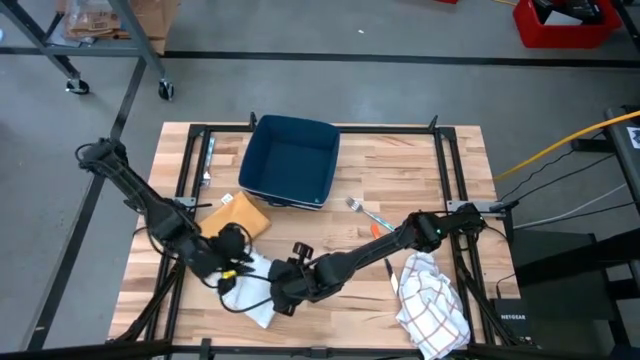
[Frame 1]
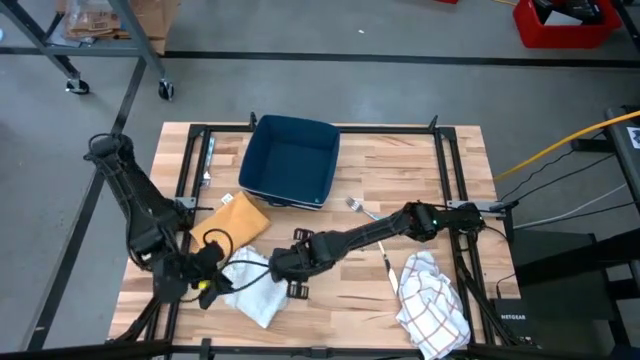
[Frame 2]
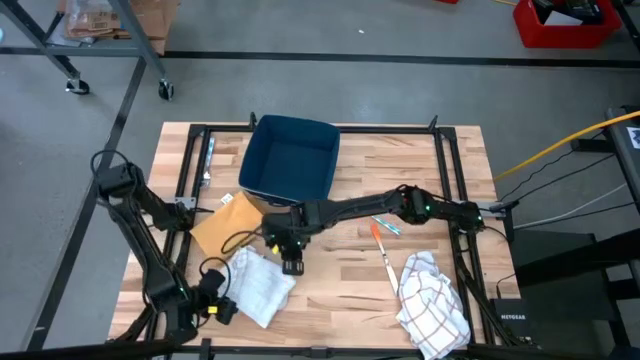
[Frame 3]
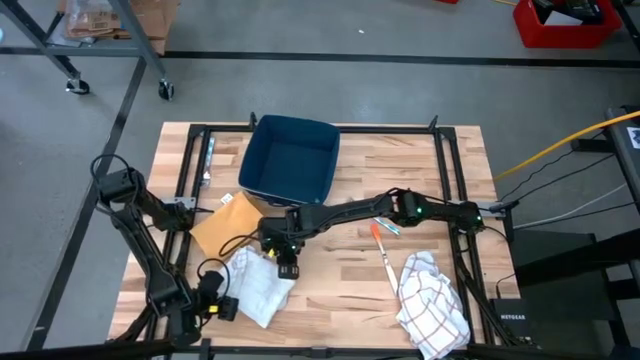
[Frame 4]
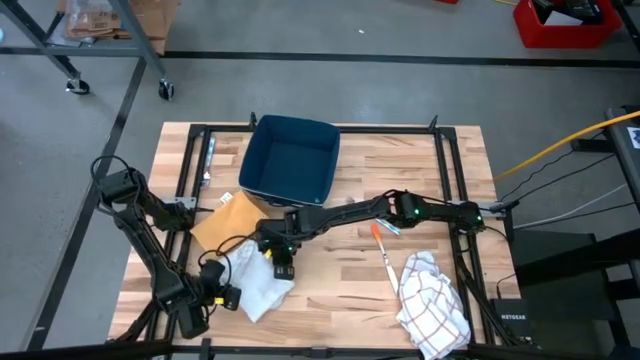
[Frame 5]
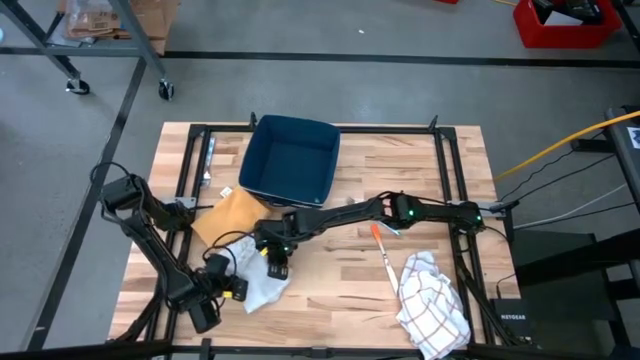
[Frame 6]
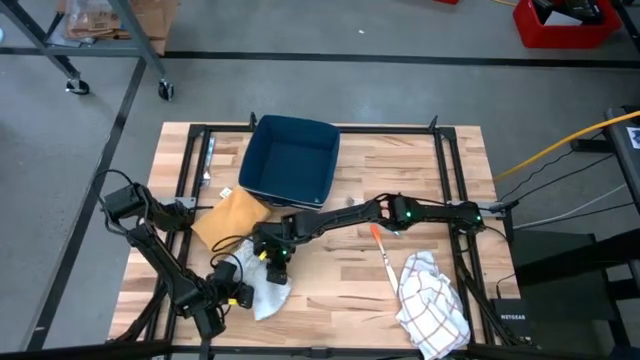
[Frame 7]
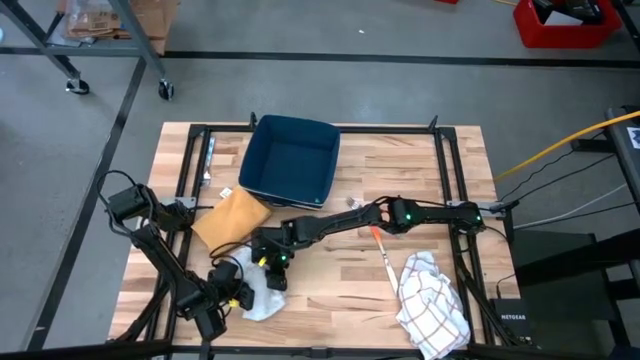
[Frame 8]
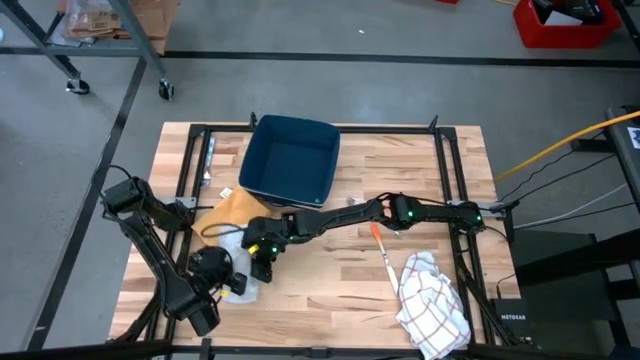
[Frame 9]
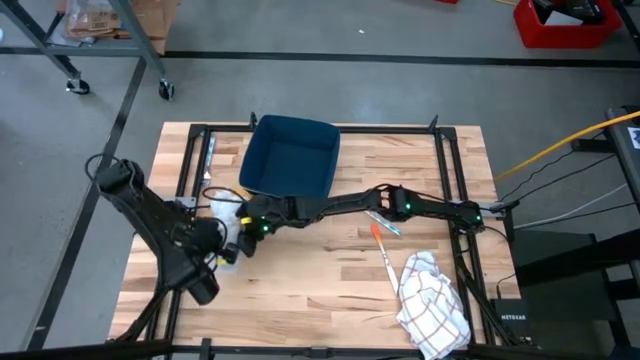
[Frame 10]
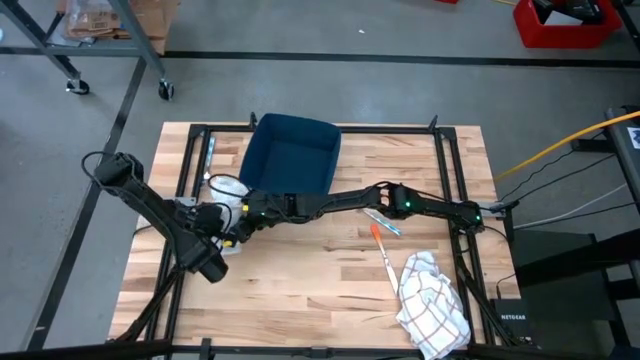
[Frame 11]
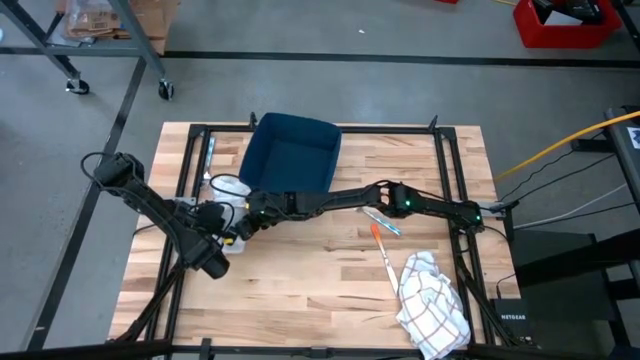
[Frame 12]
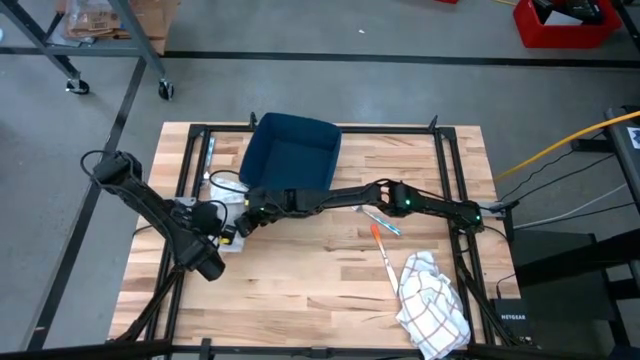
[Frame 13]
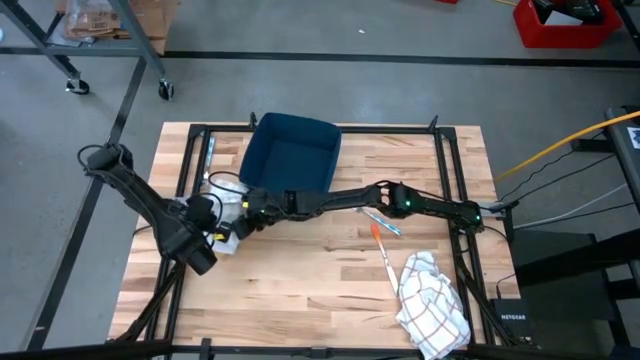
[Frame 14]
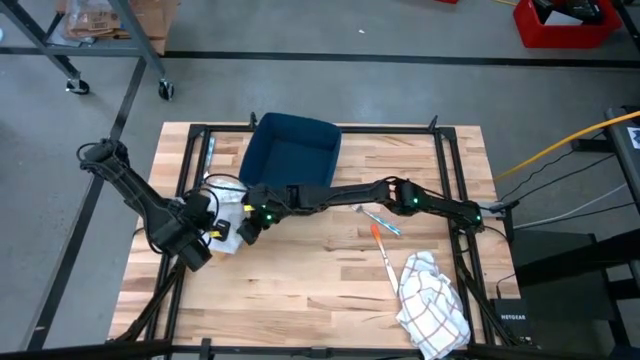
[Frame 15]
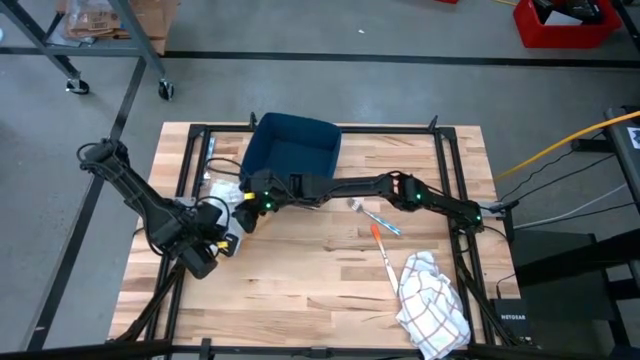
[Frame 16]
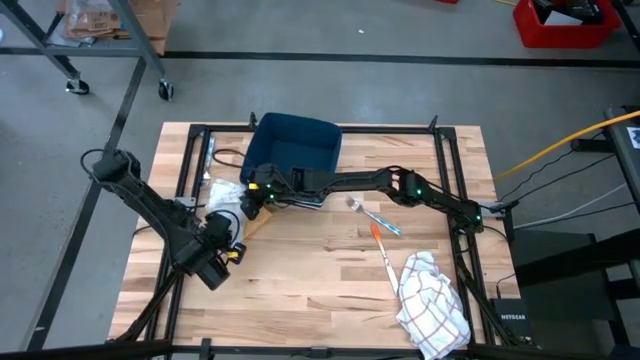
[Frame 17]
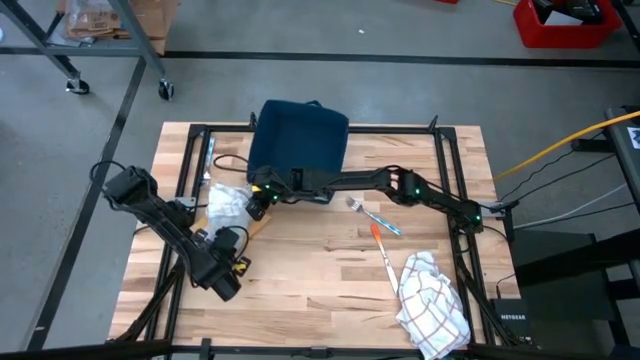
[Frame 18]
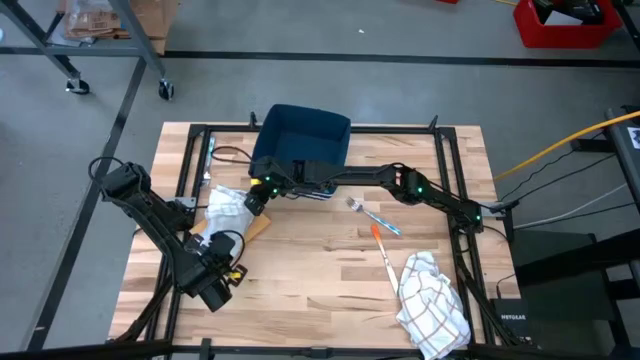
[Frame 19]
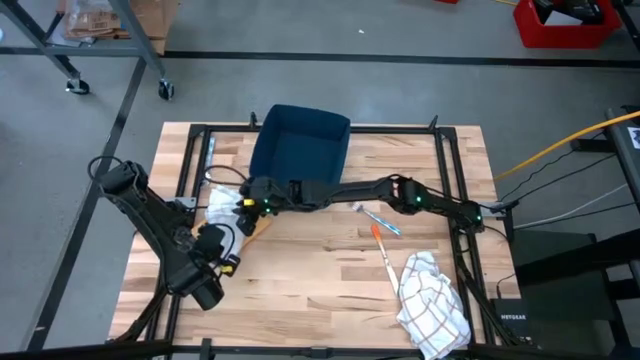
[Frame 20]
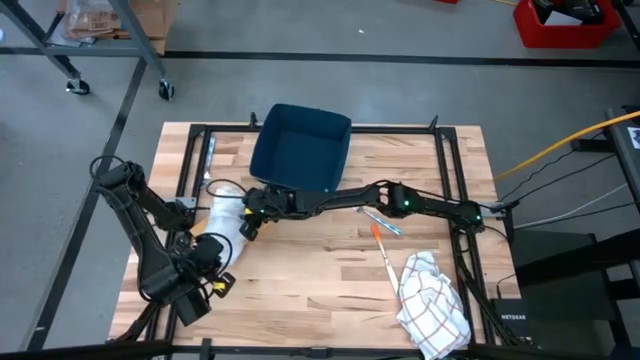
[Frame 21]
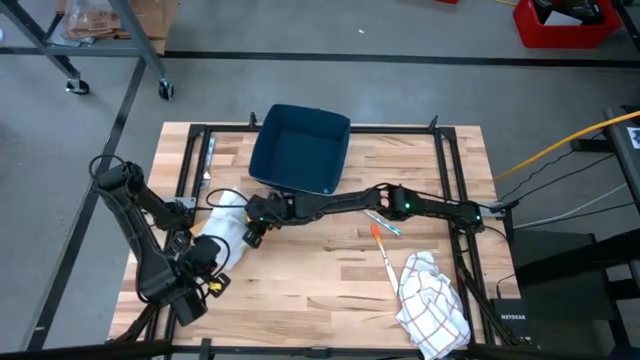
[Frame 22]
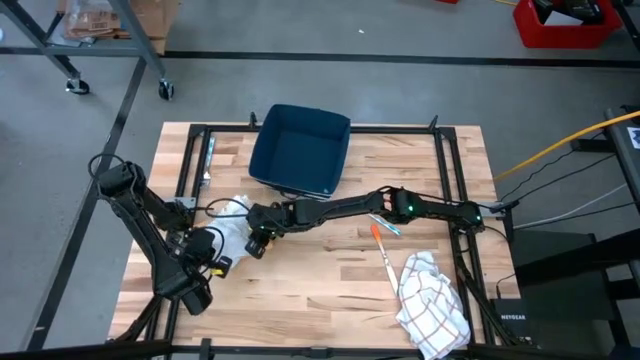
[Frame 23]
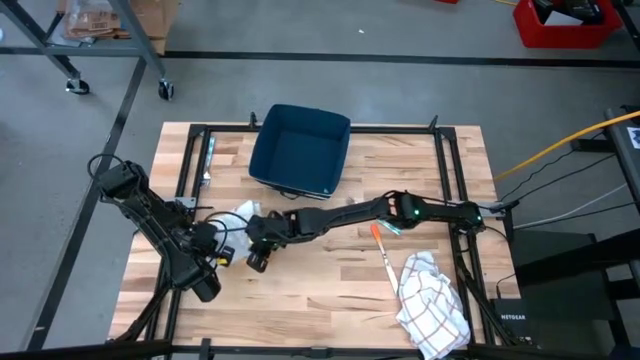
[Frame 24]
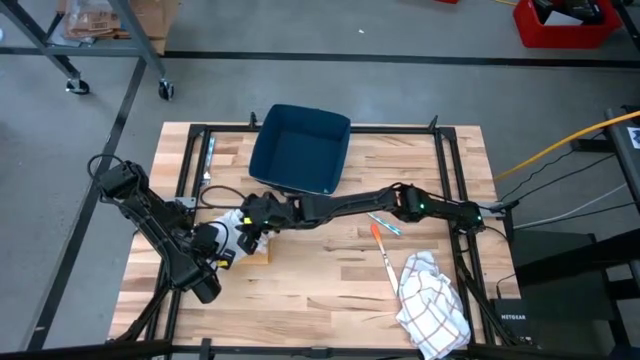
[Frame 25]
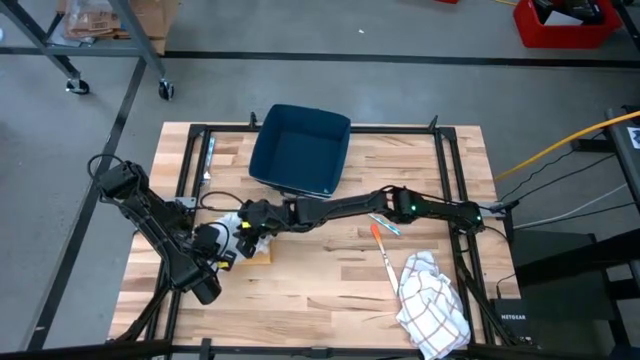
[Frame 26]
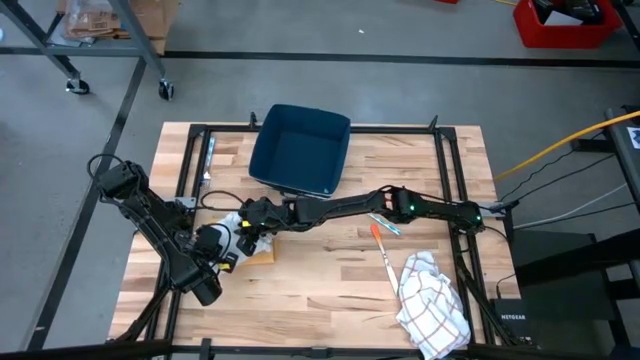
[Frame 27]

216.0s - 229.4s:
Task: Fold towel
Stack the folded top white patterned towel on top of the yellow towel

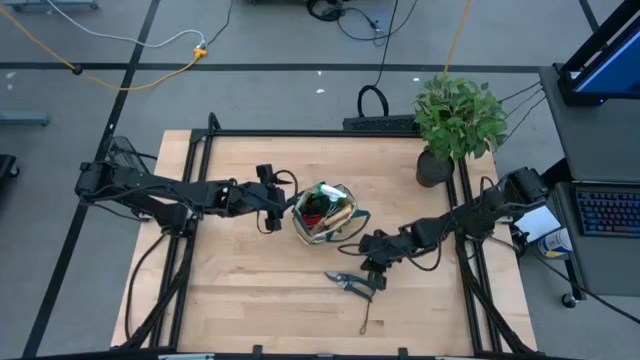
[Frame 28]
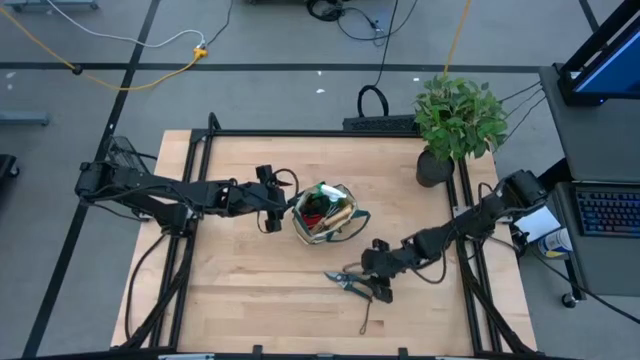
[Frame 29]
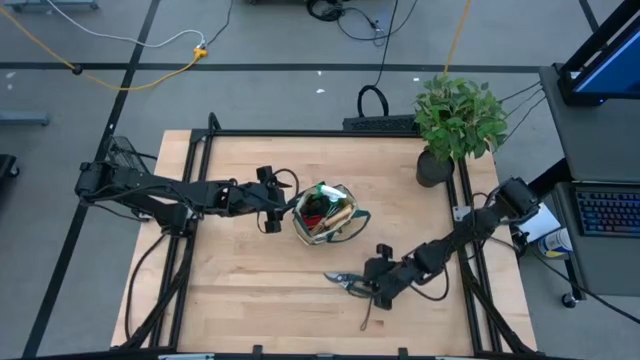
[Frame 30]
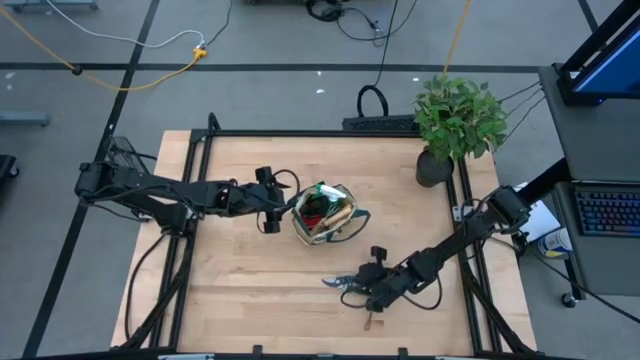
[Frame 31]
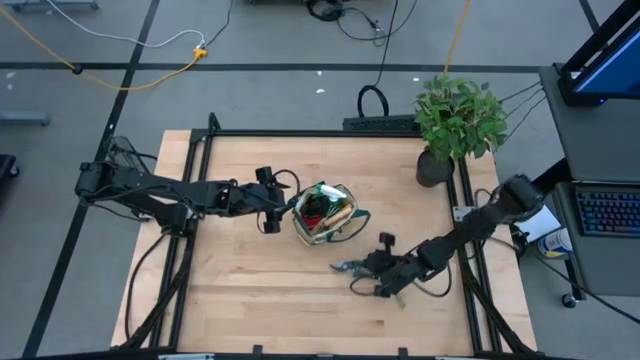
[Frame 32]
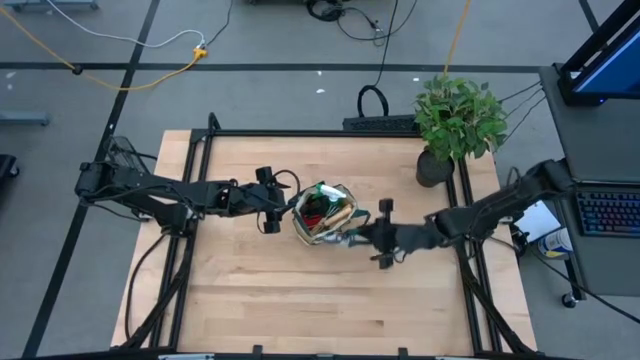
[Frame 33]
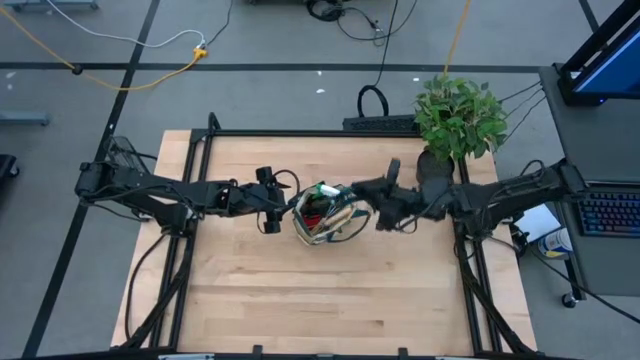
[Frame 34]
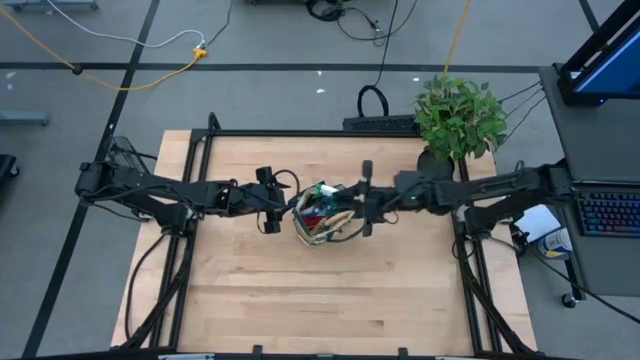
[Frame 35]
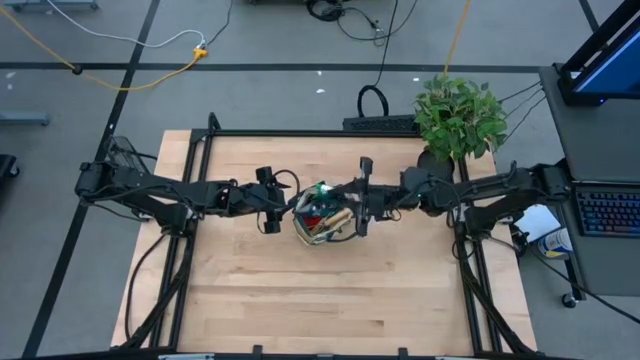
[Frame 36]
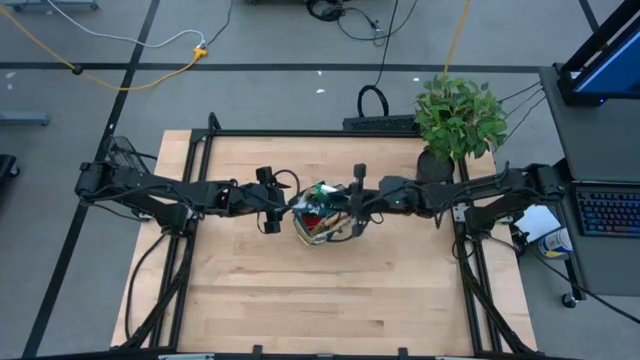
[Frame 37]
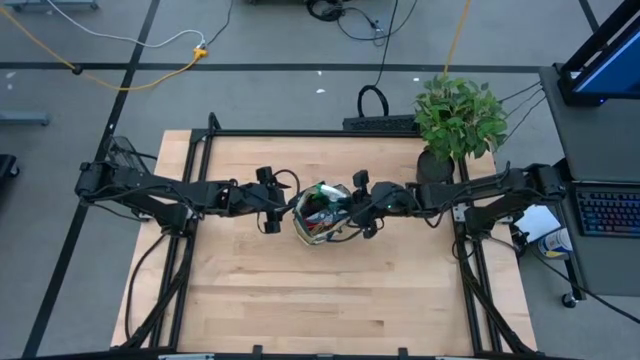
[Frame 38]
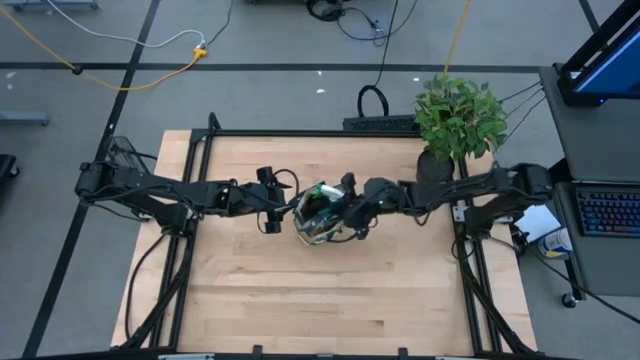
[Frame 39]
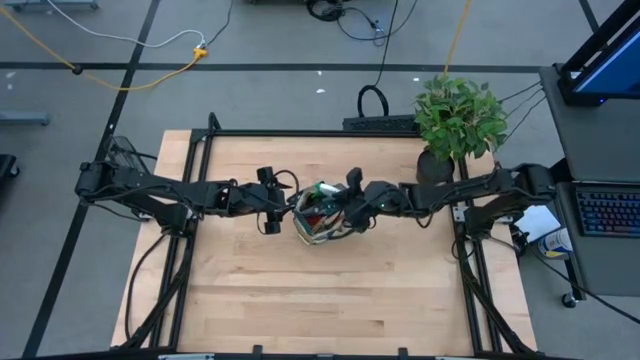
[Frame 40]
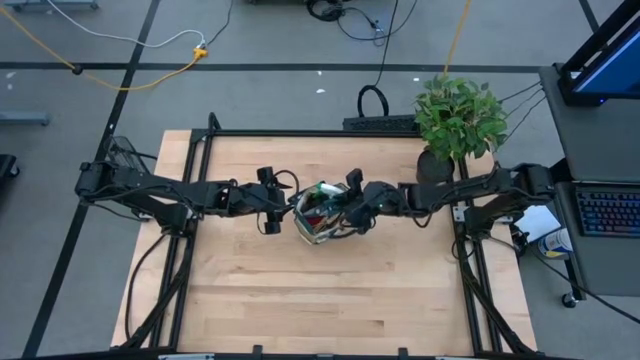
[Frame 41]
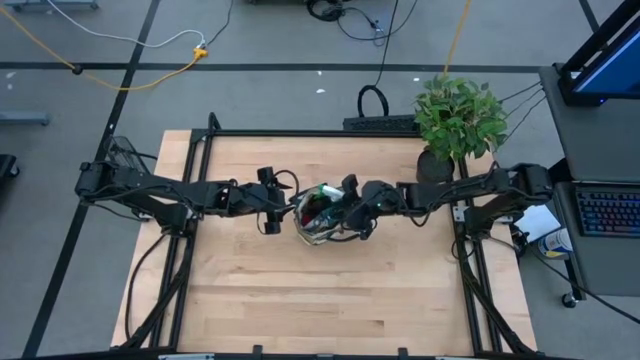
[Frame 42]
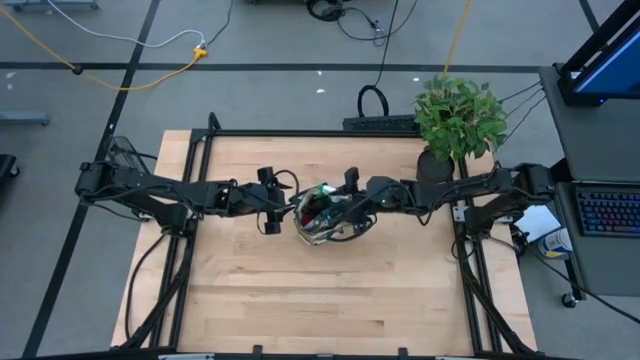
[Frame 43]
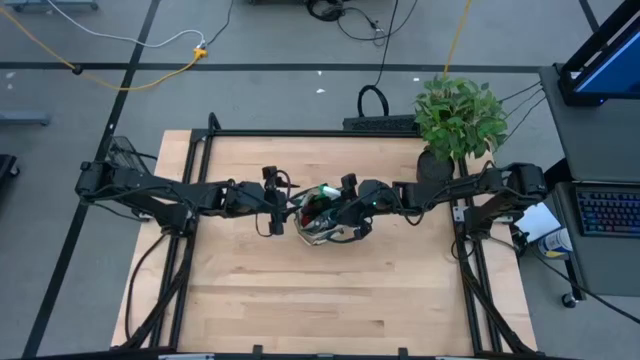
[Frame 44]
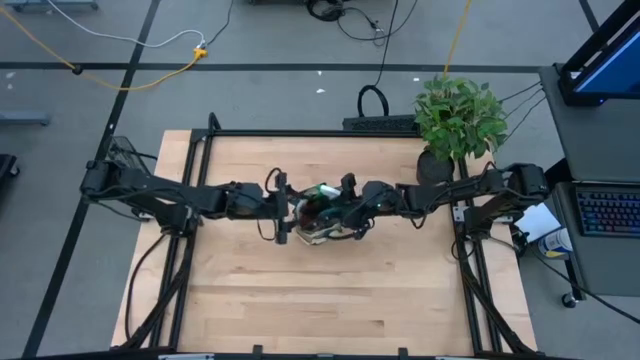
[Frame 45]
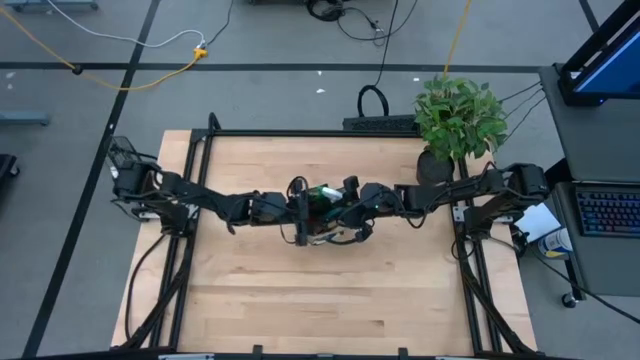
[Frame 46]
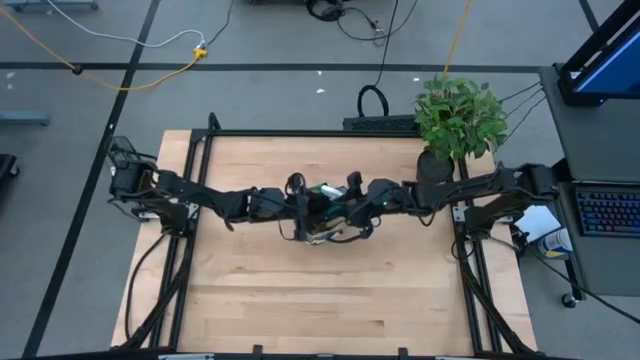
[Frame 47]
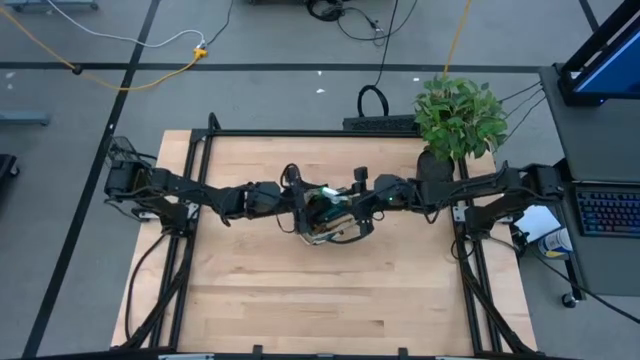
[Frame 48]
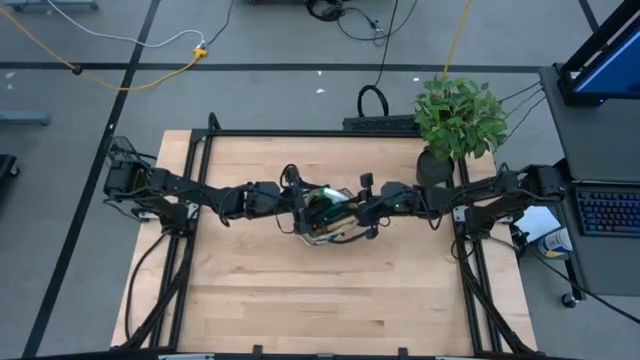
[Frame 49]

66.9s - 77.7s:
Task: Pick & Place Garden tools in Gardening bag
Put the green shear scissors into the green gardening bag
